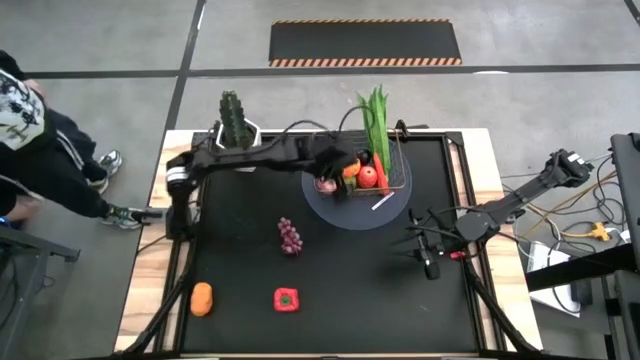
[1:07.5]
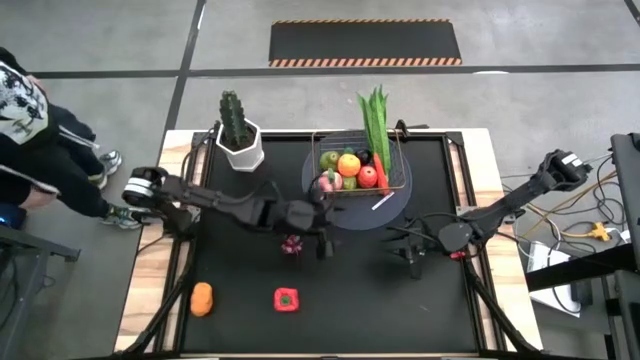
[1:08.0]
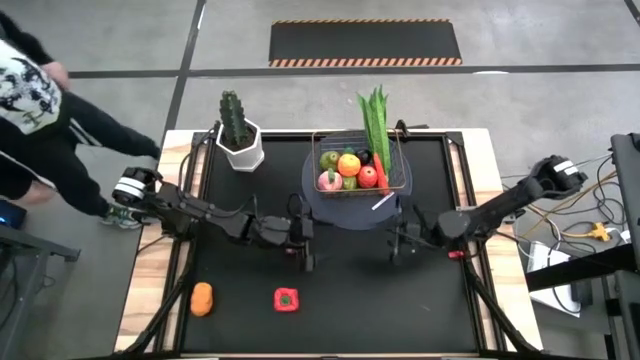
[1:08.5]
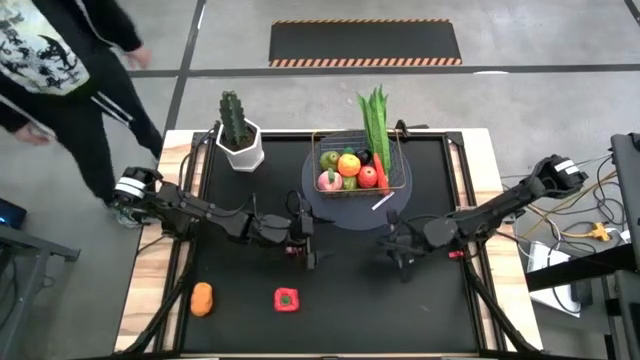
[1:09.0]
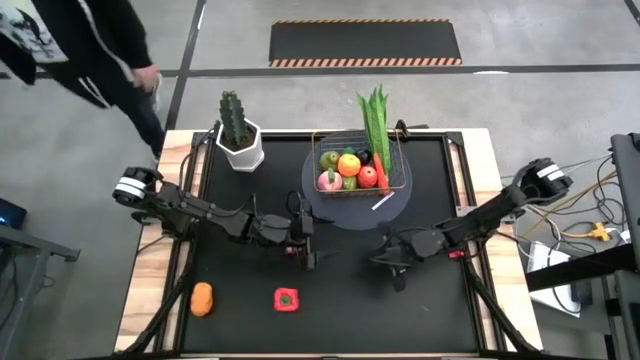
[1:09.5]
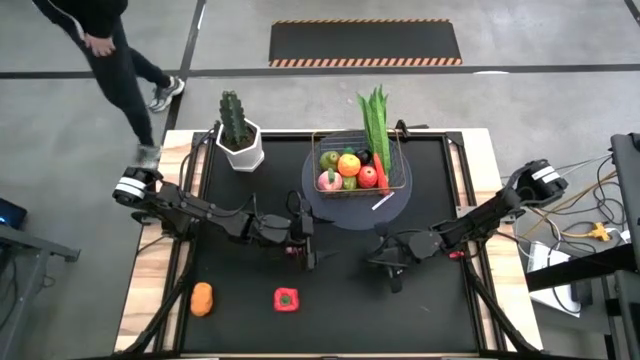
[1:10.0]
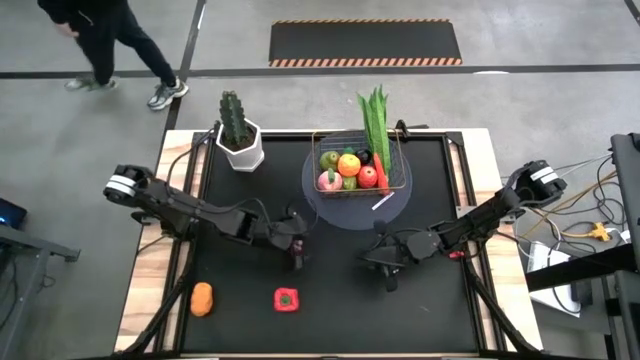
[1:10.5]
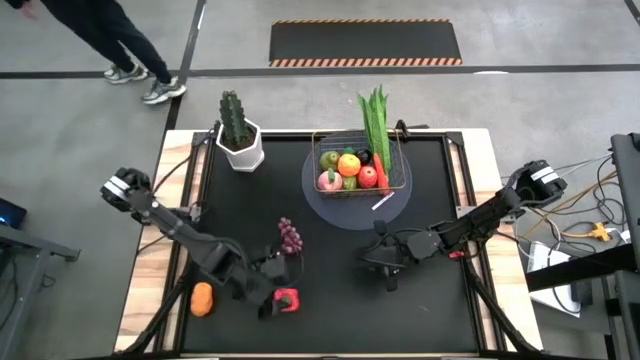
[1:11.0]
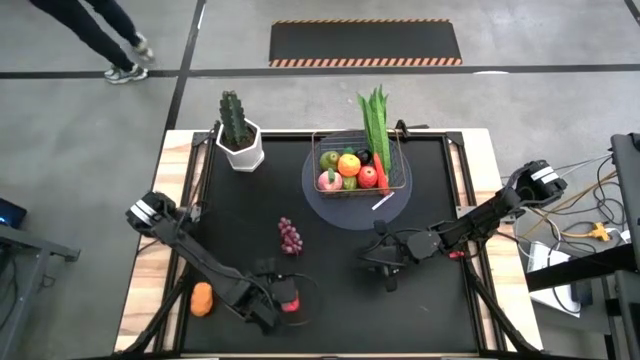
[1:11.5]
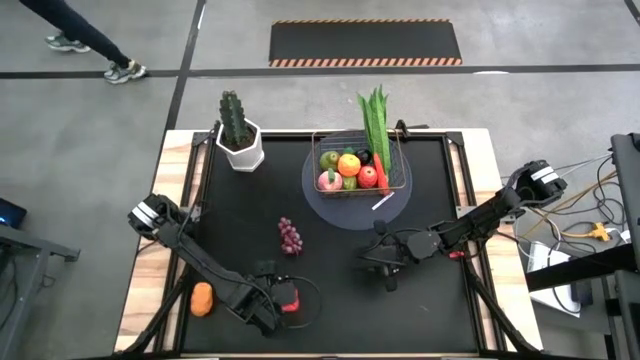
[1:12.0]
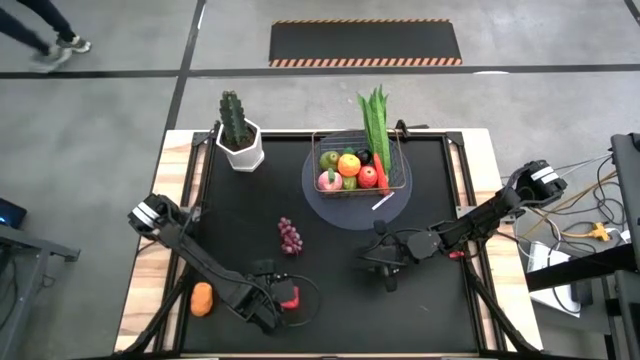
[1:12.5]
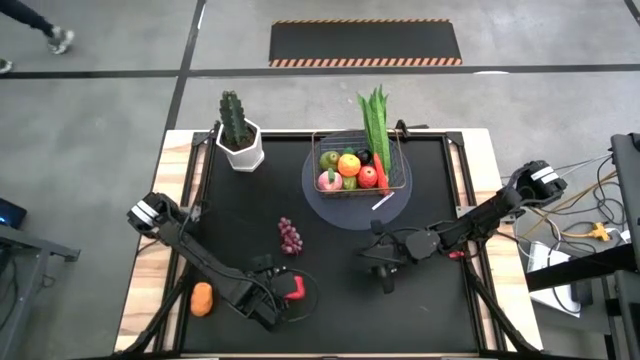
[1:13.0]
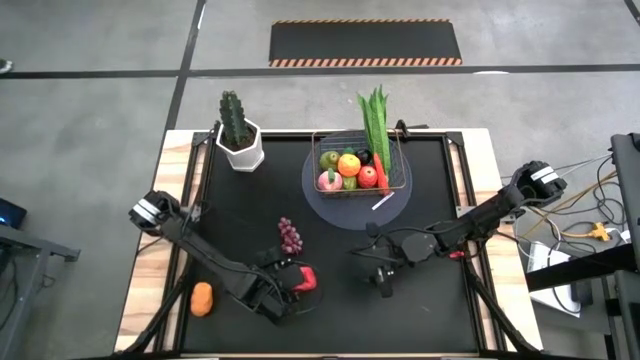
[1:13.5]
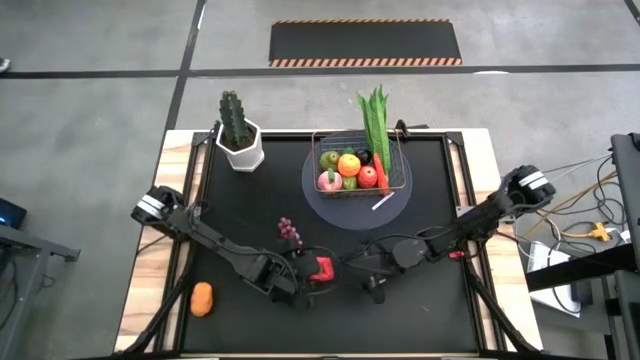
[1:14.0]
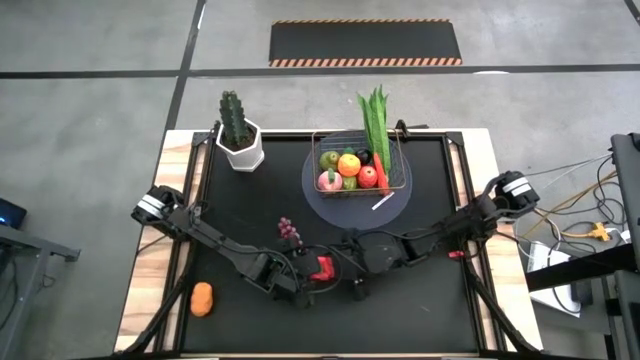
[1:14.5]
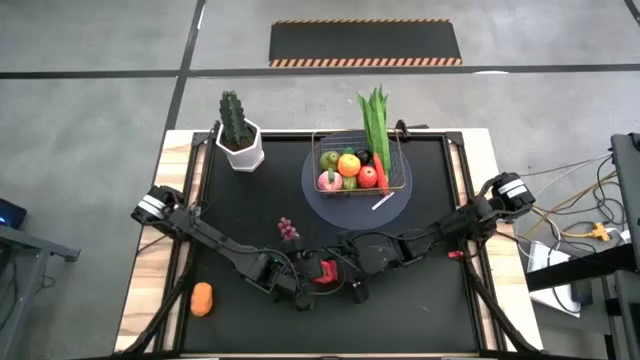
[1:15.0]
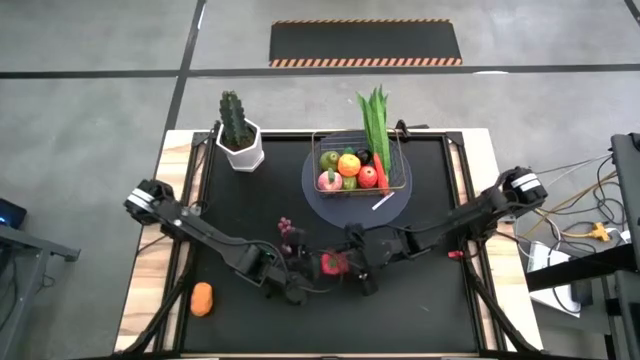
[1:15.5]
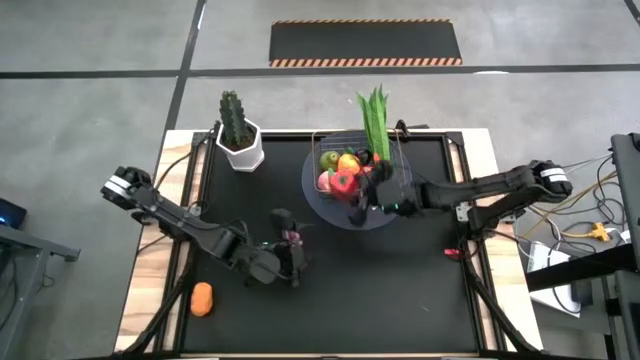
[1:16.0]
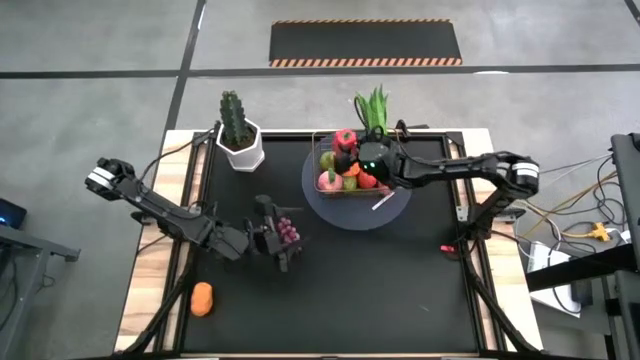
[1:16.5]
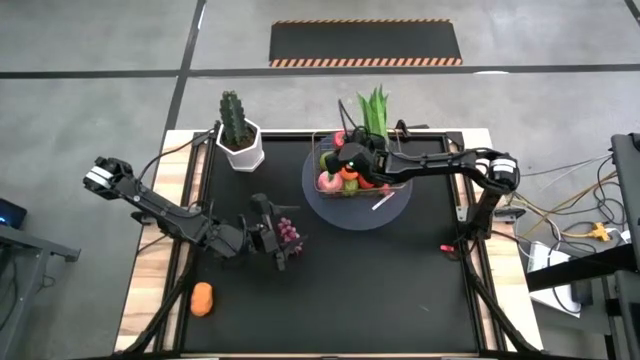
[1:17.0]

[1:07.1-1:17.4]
Task: Build produce basket
Put the red bell pepper into the gold wire basket

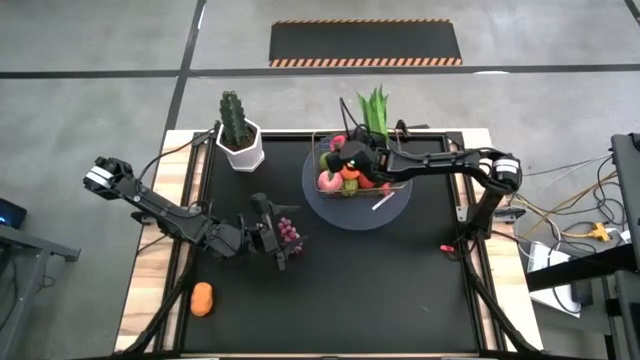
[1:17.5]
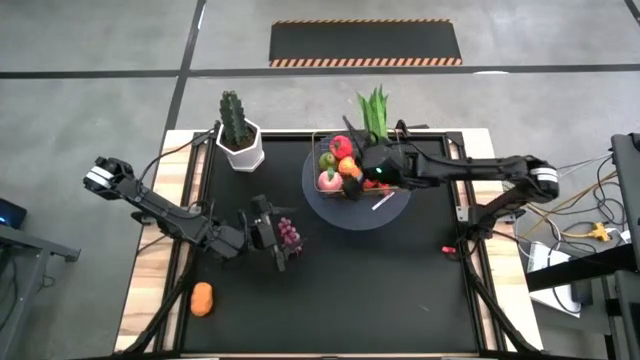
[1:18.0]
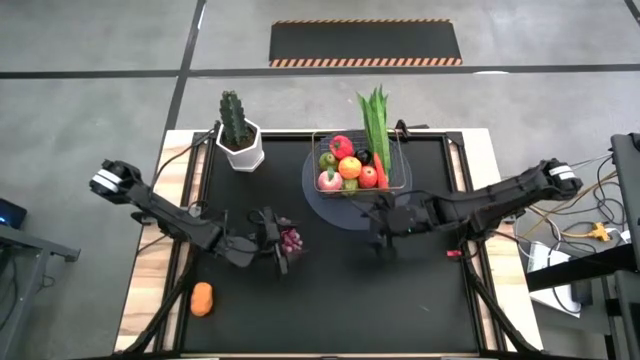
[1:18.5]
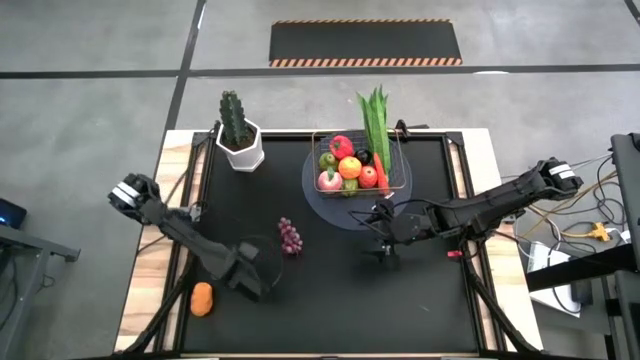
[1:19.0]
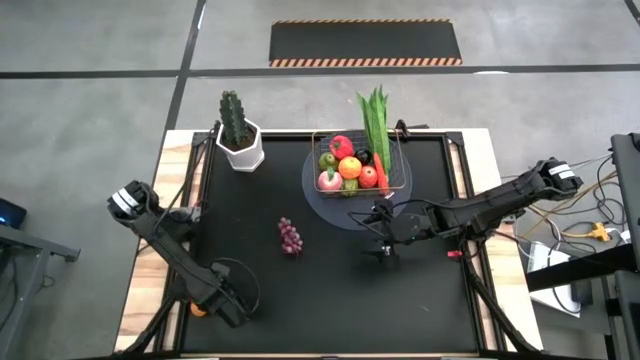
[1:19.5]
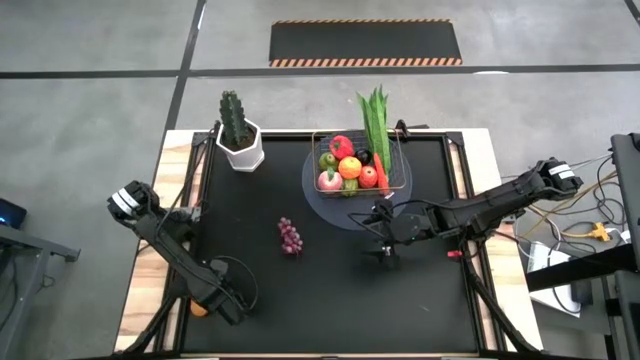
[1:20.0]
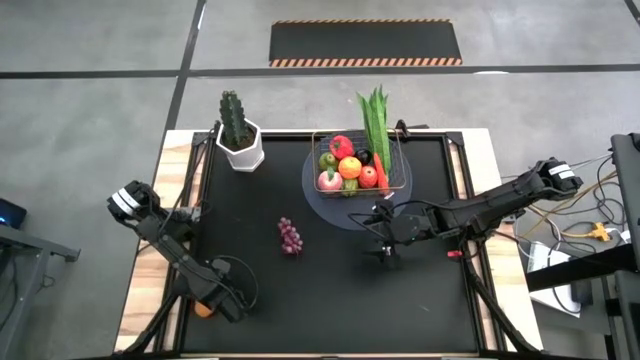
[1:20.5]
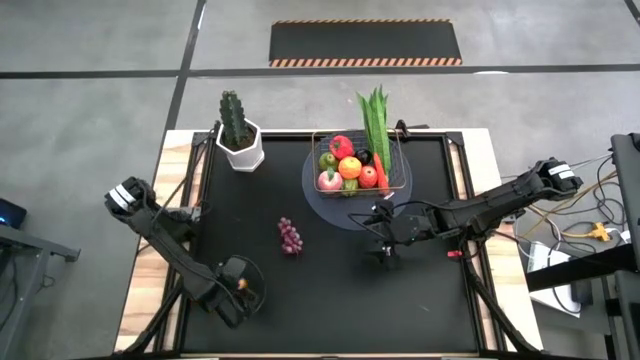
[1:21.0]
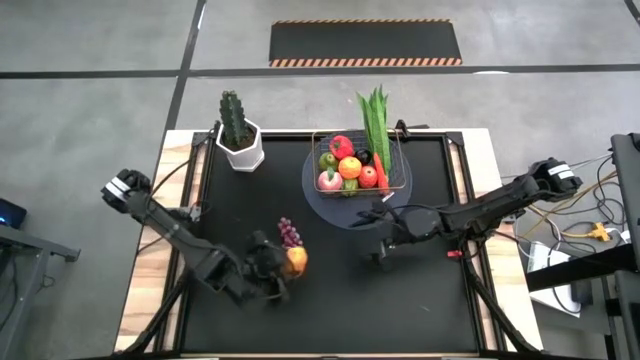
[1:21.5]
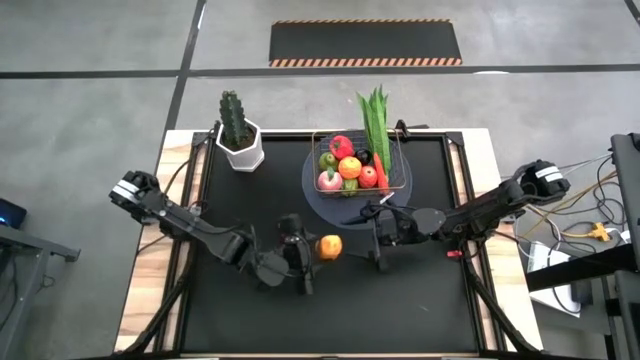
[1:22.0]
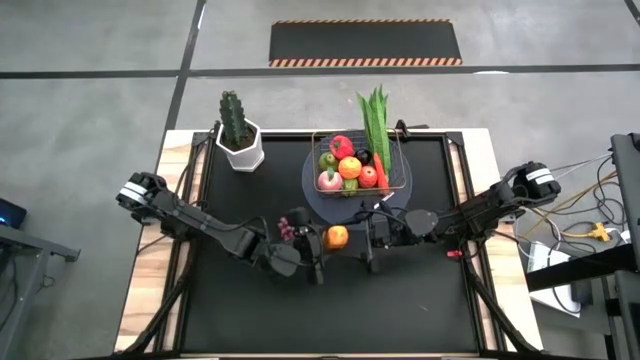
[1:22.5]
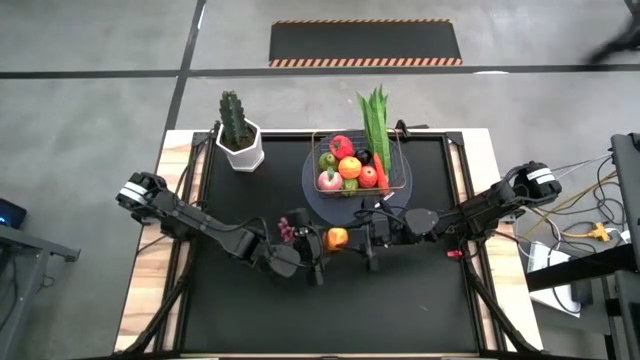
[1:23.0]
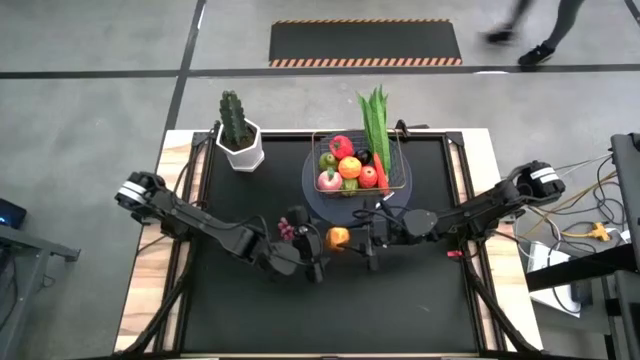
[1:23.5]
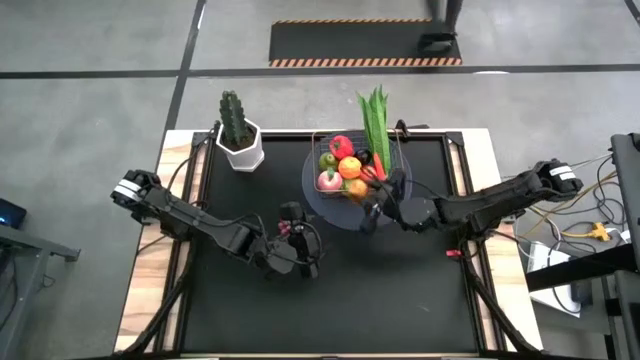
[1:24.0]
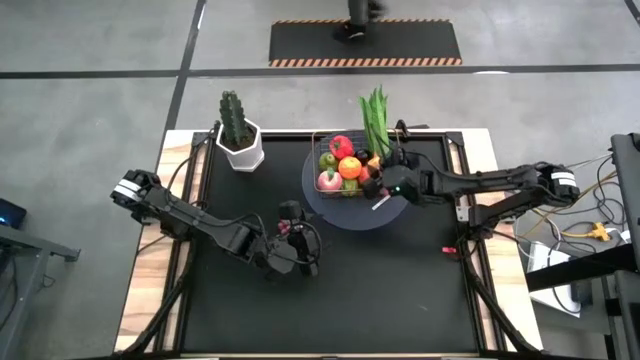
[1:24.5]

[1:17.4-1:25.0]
Put the orange potato into the gold wire basket

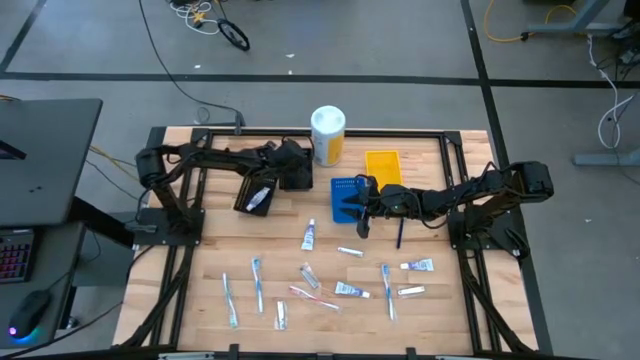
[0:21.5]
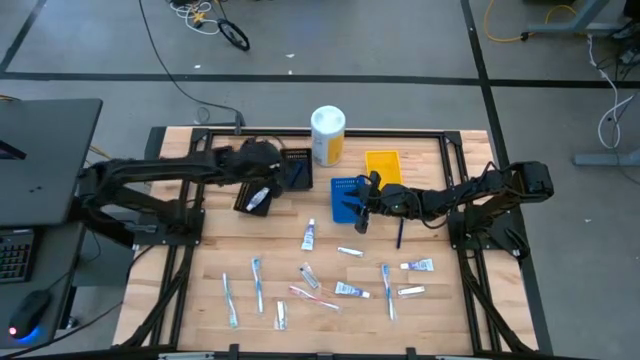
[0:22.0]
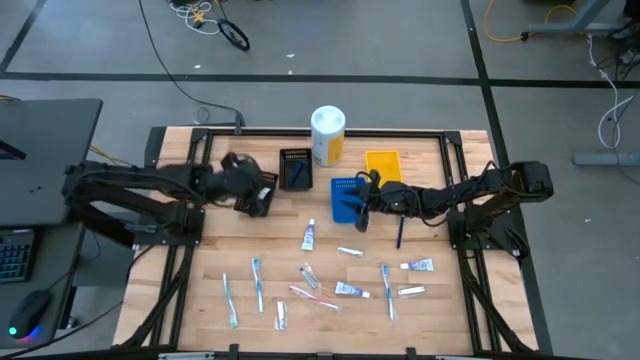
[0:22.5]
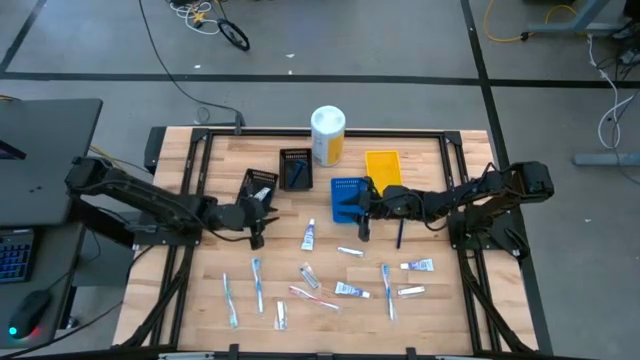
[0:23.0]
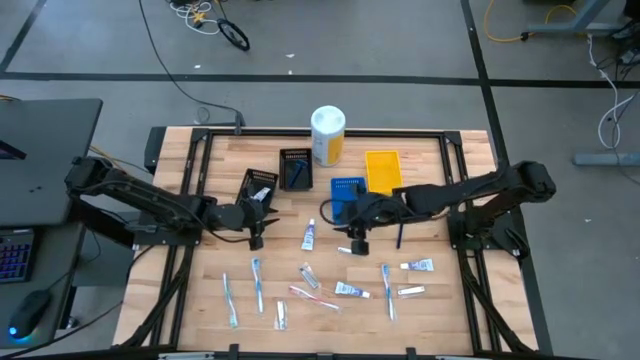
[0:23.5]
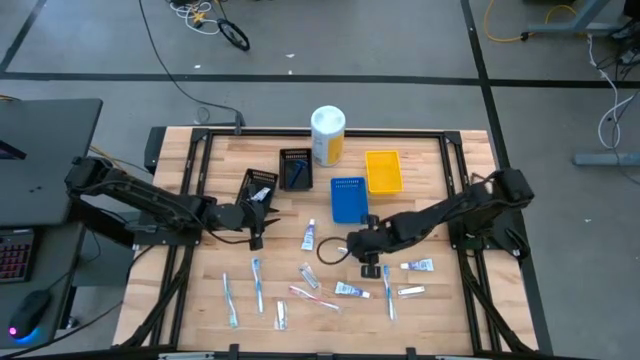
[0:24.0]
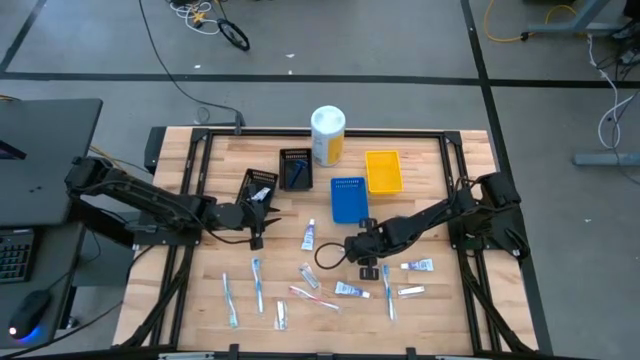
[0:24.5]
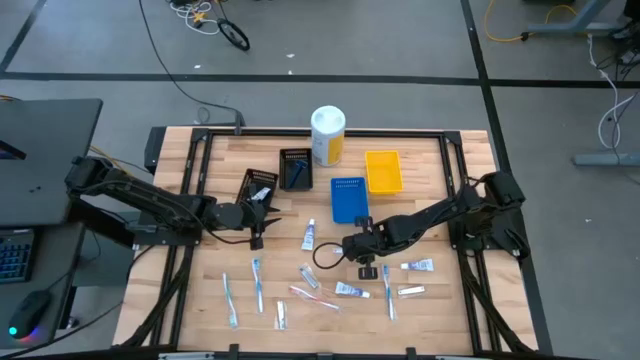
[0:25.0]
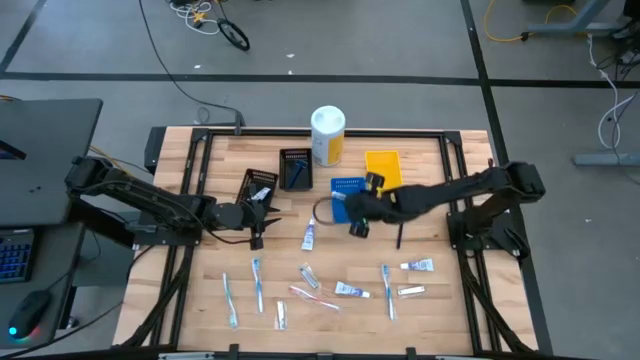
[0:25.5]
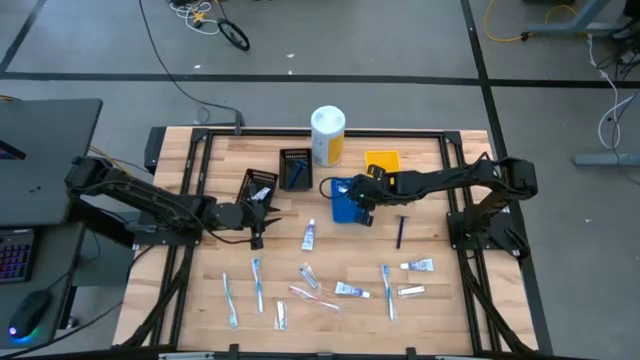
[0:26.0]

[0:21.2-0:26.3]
Task: Pick & Place Travel size toiletries
Put the silver nail cutter into the blue bin
